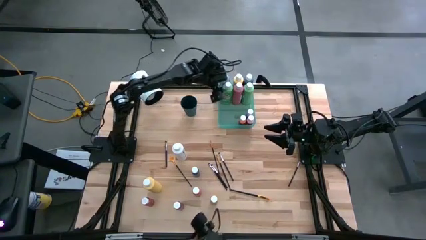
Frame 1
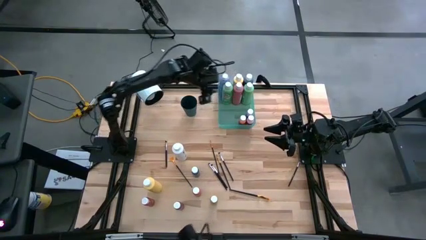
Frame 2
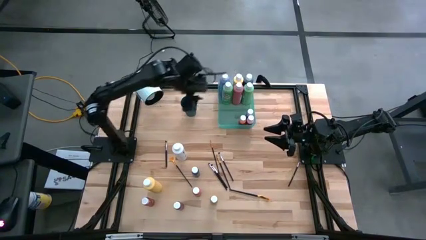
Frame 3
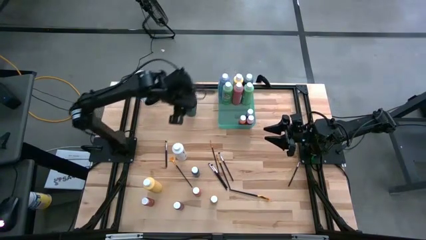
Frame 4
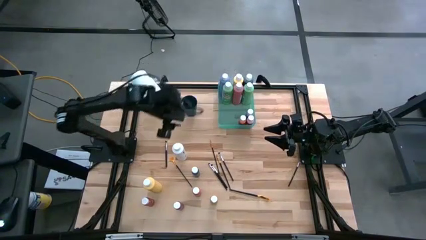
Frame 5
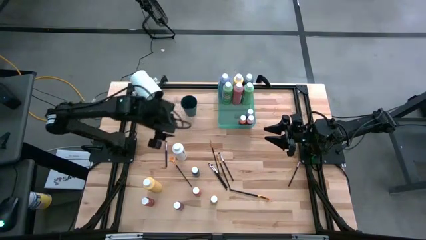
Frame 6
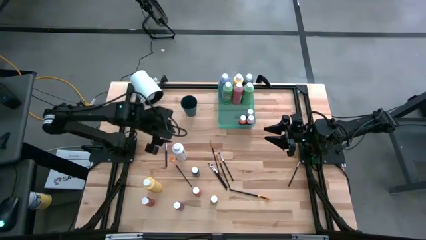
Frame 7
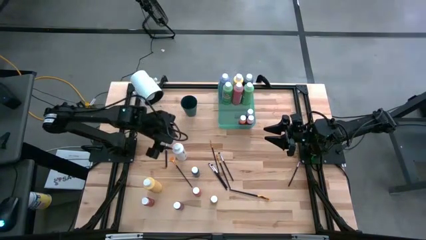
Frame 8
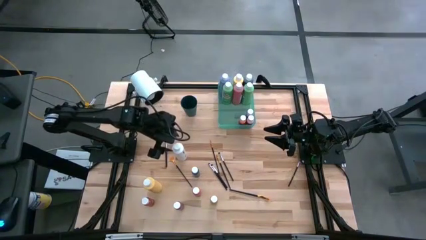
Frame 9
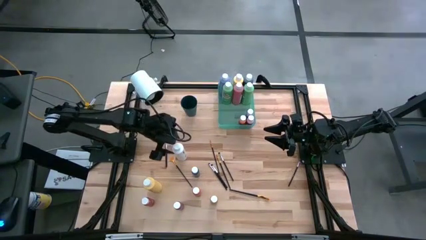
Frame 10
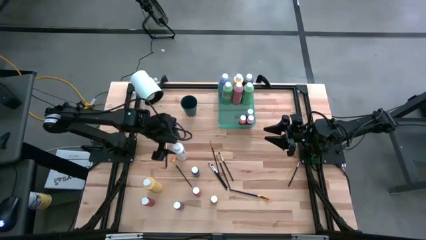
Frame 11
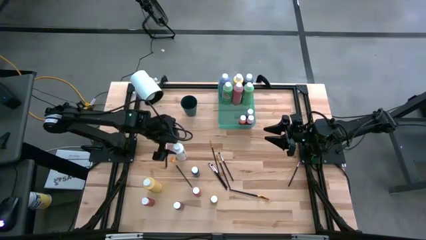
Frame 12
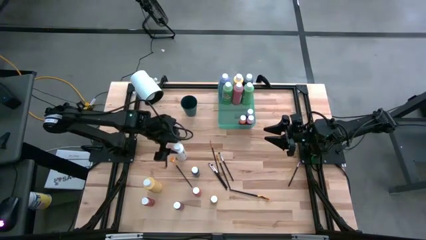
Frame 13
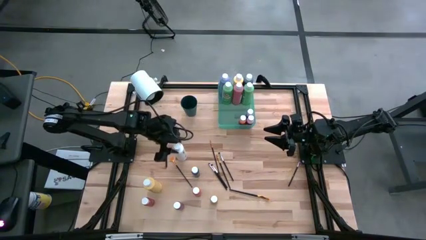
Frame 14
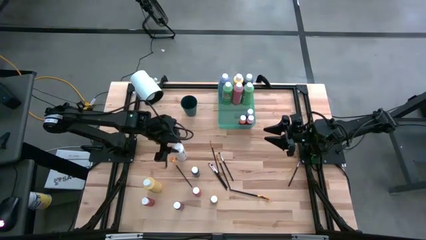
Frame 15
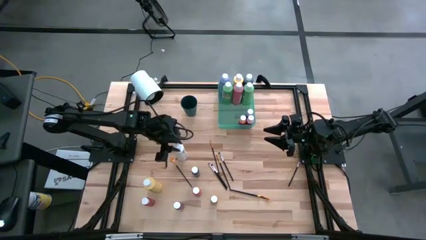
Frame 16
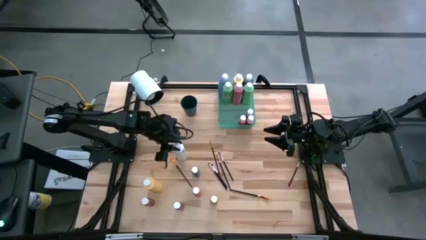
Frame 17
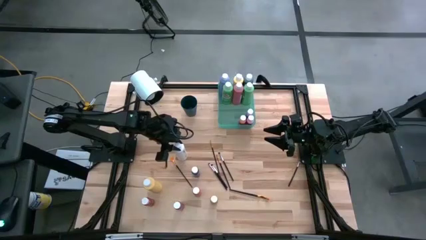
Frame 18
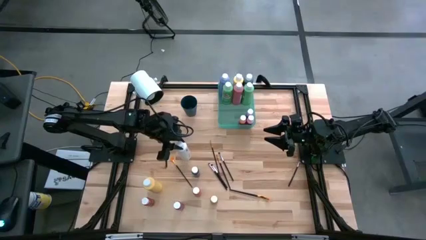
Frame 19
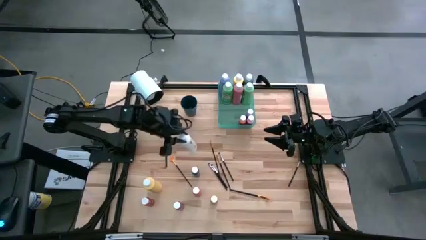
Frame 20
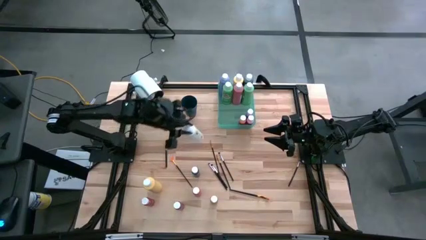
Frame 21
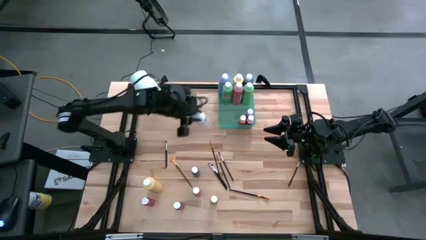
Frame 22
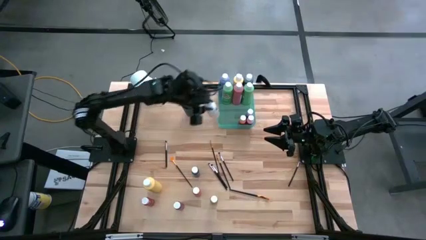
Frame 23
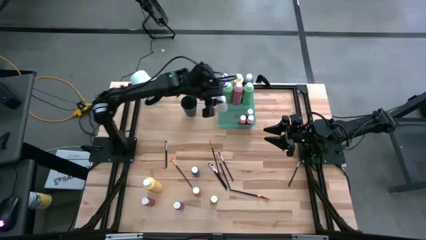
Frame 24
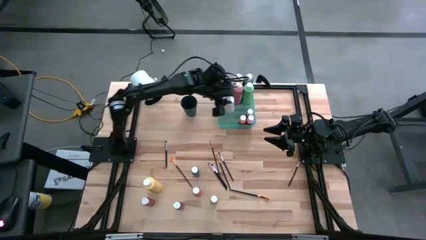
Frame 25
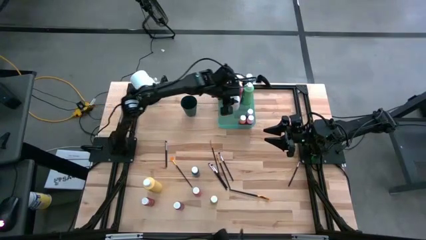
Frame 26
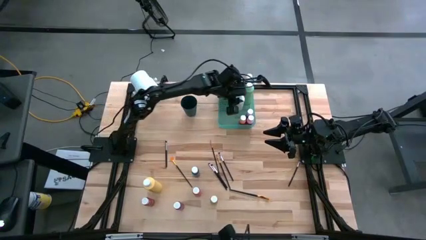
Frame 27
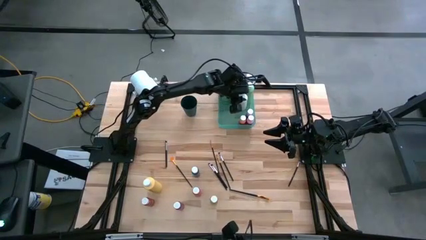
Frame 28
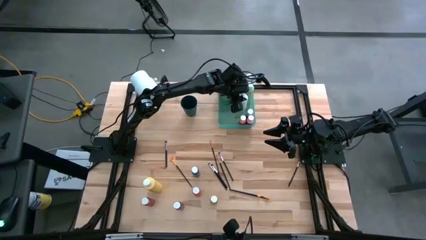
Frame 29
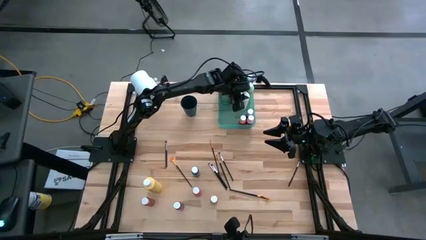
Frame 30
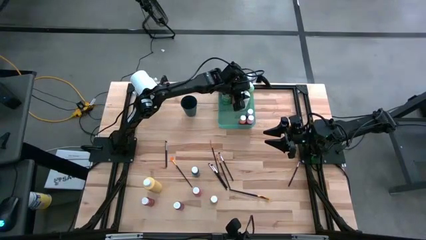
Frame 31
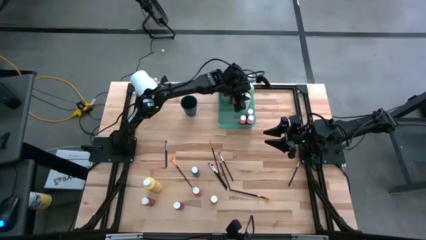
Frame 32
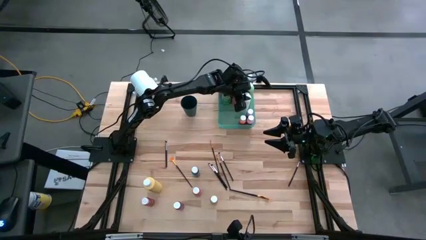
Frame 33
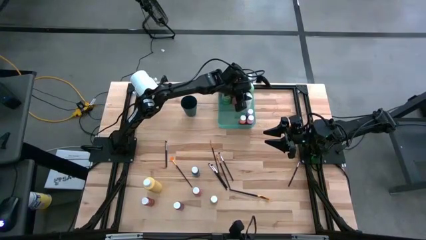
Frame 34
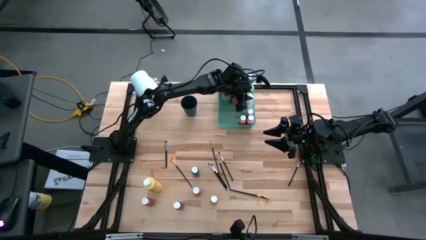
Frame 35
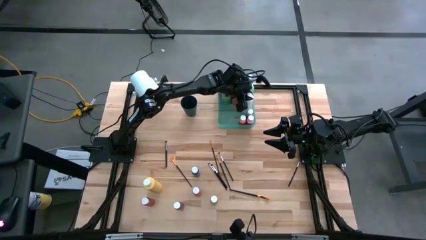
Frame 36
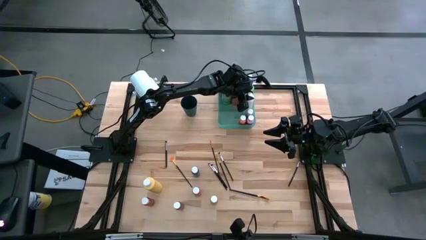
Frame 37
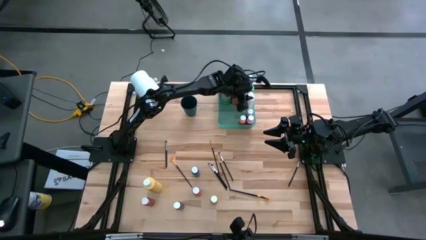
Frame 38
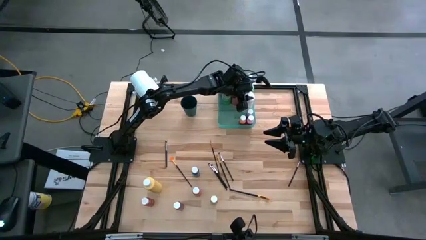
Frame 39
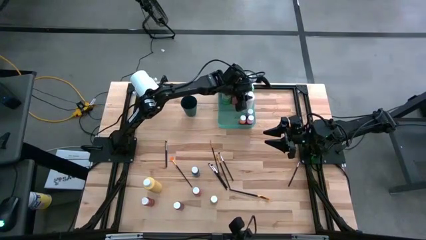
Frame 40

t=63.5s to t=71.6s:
Task: Pick & Place Paint Supplies
Put the white big paint bottle into the green bin

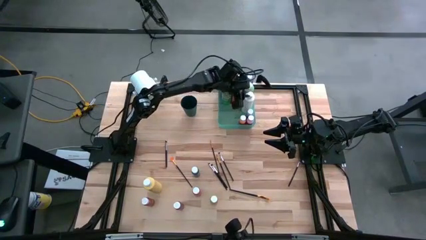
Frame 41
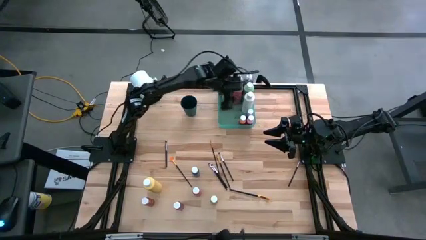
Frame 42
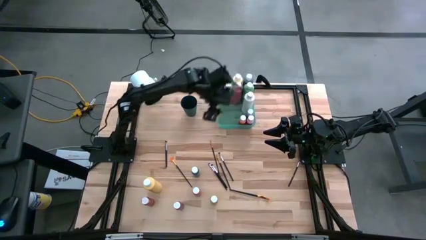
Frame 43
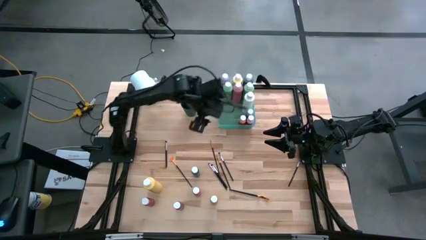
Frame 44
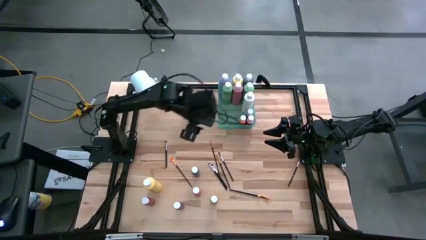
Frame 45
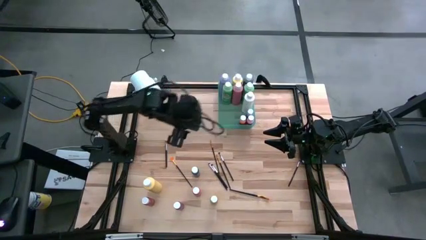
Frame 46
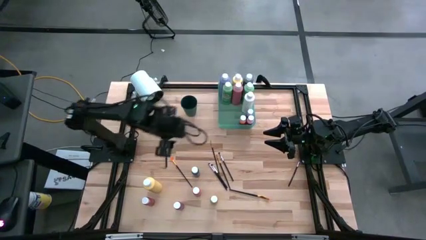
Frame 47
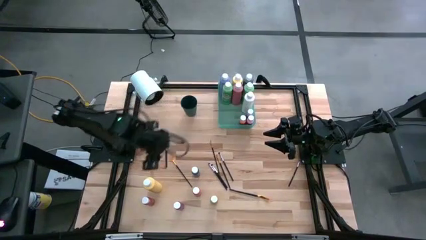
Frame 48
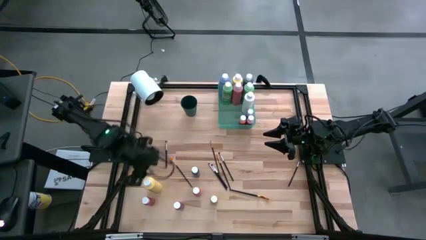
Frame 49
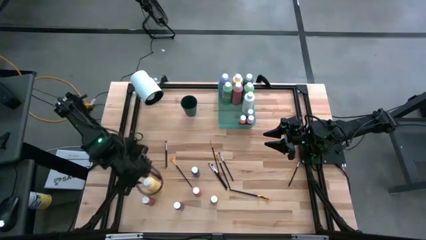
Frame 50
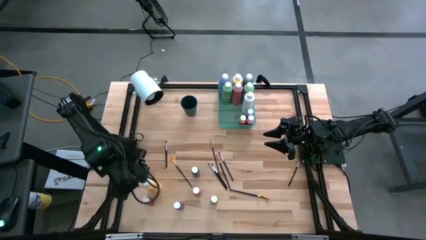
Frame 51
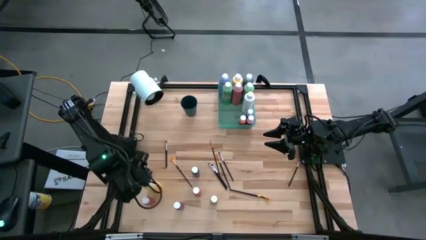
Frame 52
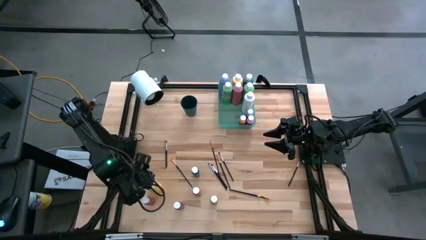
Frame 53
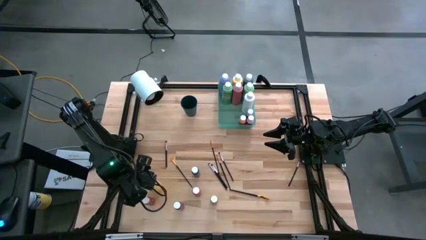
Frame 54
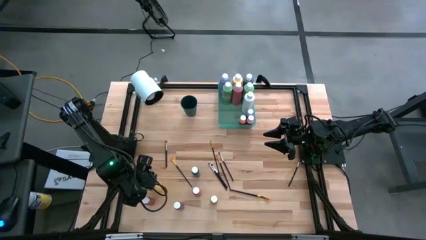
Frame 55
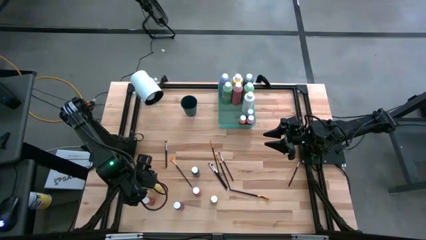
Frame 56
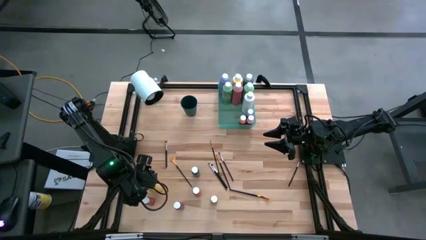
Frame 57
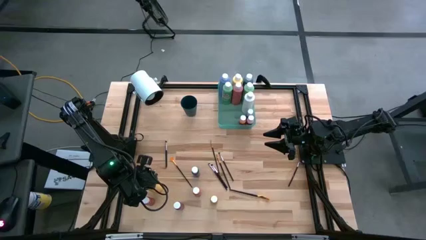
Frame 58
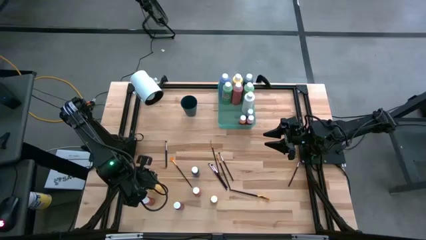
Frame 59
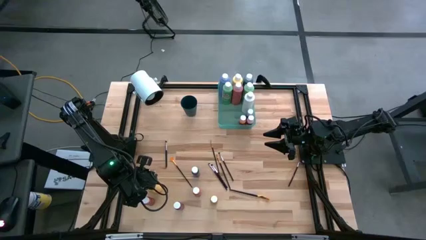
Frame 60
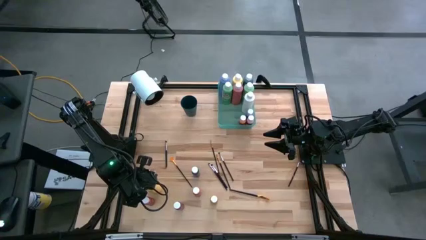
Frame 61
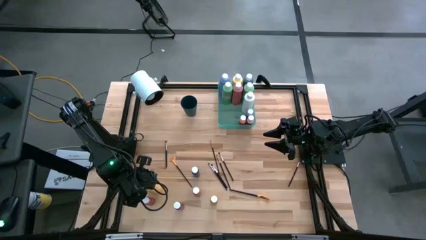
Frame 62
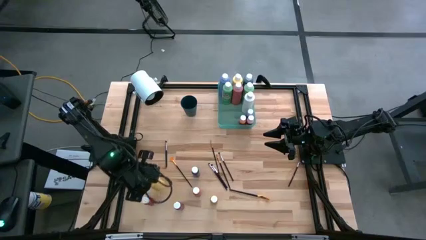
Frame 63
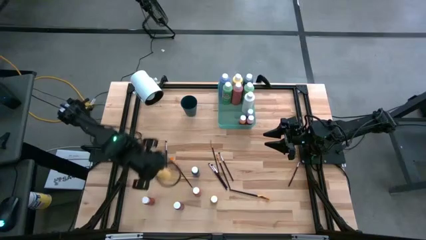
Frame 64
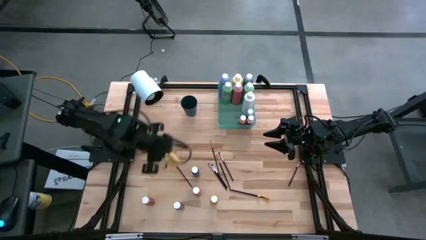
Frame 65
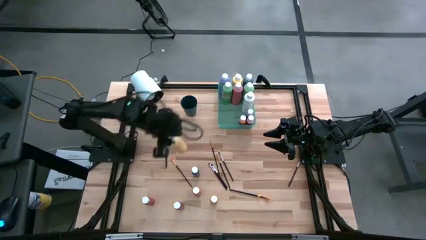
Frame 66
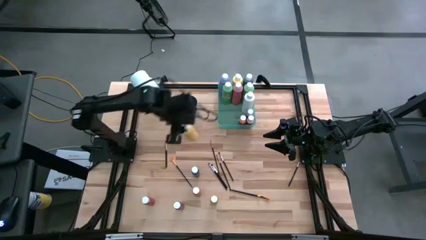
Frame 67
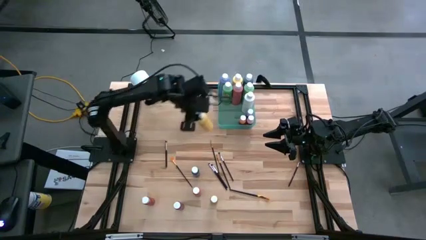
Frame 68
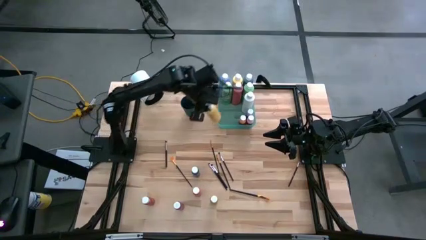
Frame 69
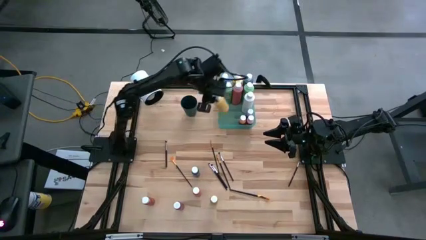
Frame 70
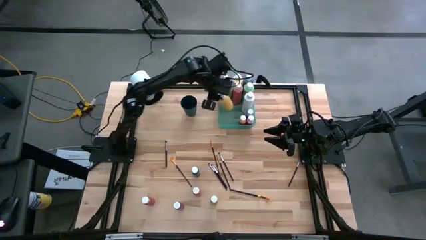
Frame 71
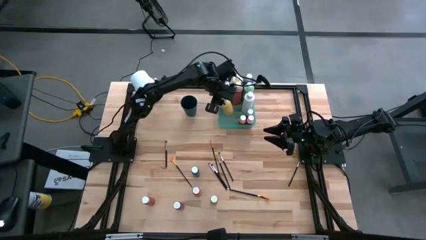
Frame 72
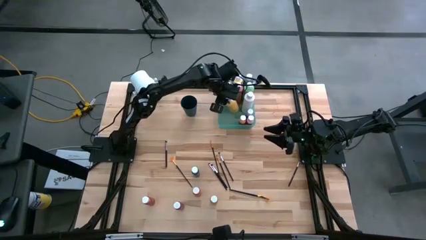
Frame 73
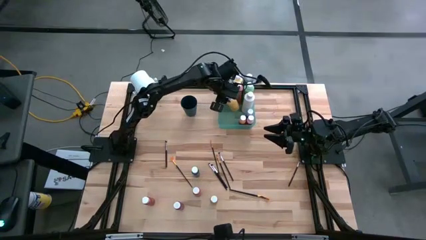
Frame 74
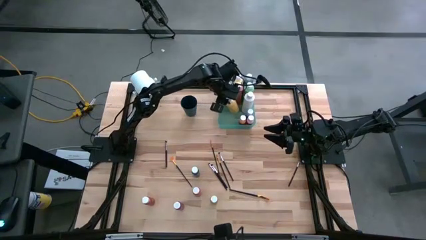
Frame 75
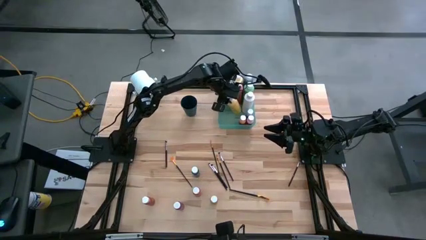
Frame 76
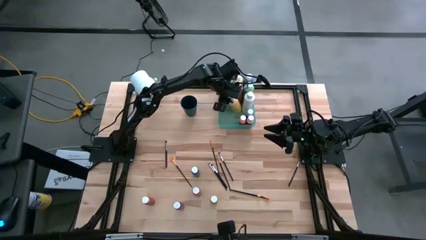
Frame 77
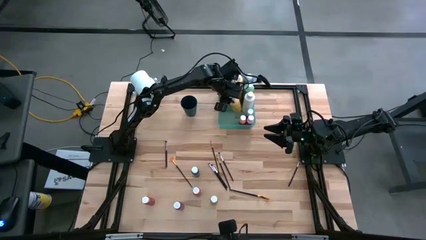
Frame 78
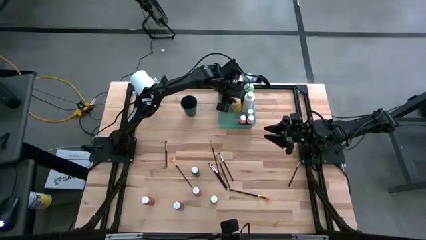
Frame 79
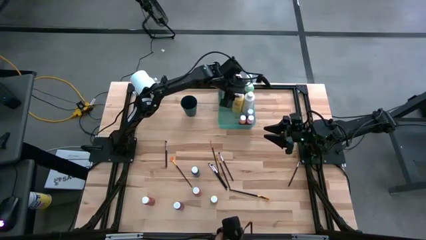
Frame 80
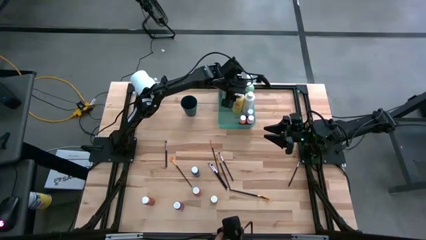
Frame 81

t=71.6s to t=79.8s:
Put the yellow big paint bottle into the green bin

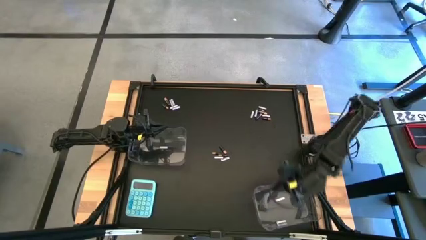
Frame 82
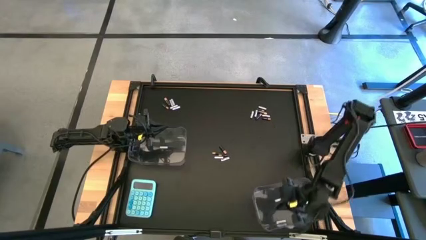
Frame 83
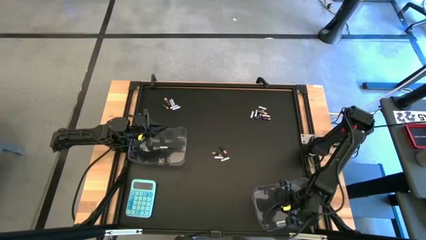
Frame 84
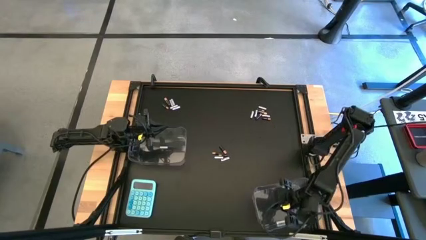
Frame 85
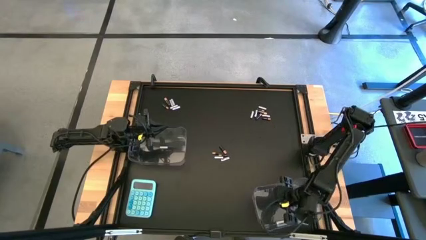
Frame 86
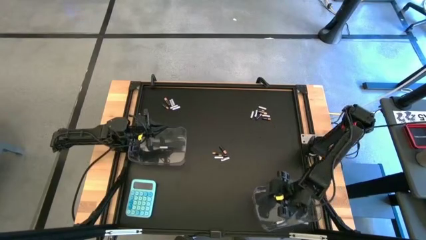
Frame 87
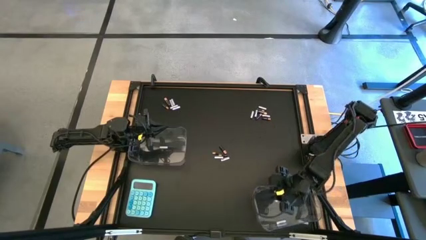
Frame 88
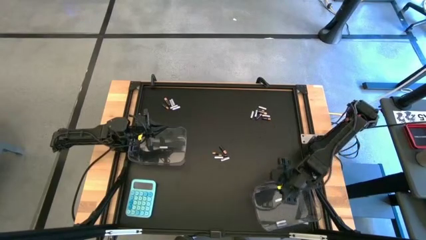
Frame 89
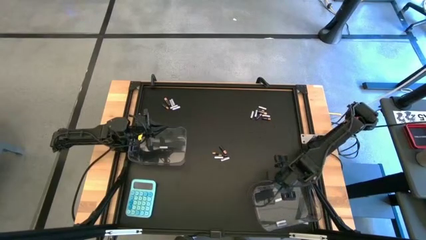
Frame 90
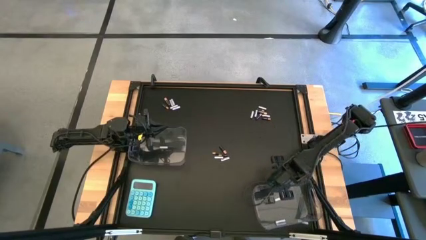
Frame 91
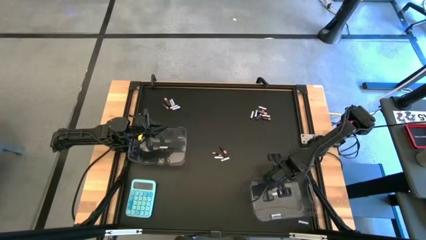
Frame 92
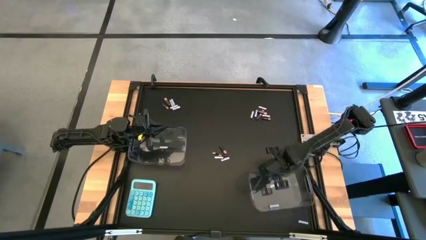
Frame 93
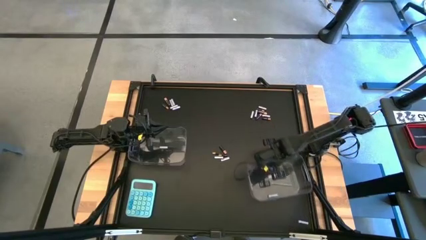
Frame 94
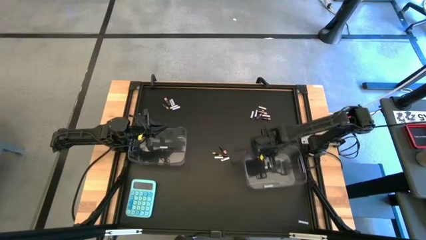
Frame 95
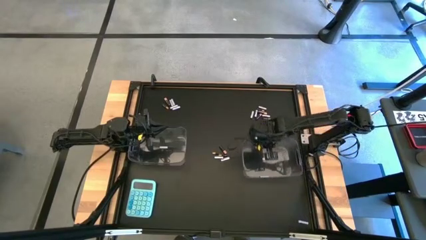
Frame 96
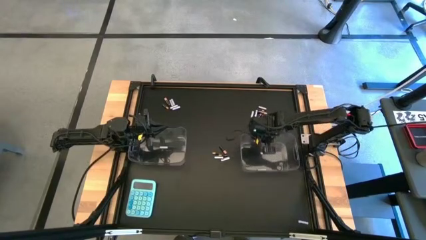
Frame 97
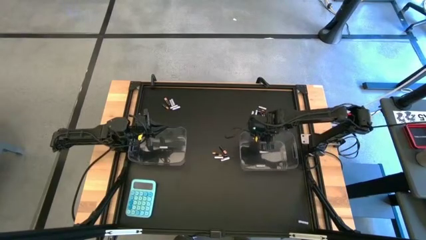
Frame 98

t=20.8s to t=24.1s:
Task: Sort batteries
Move the right transparent bin to the middle right of the table
